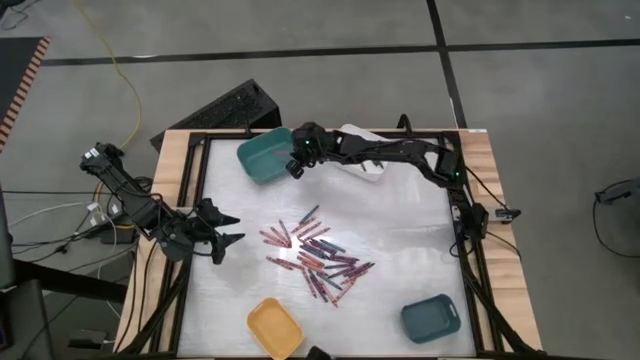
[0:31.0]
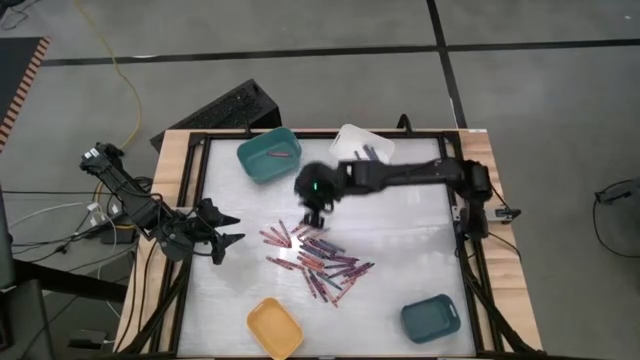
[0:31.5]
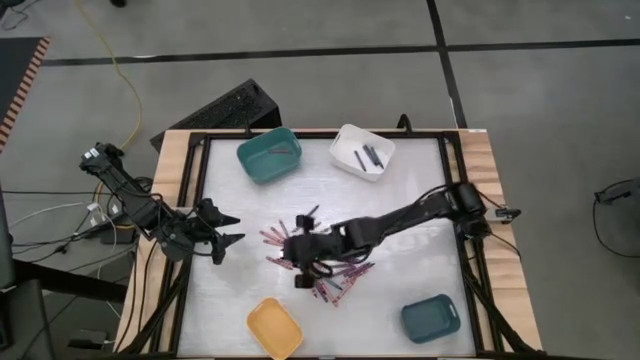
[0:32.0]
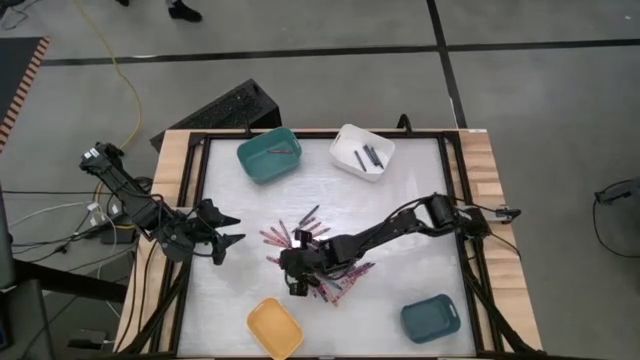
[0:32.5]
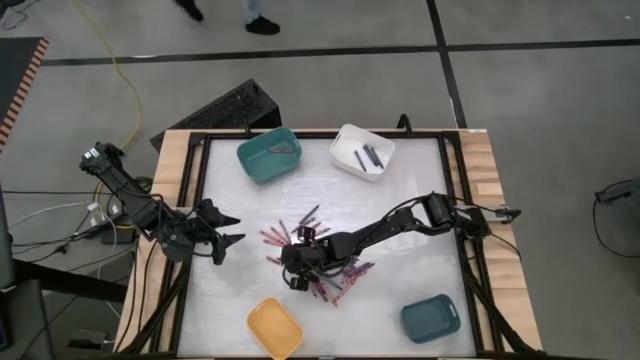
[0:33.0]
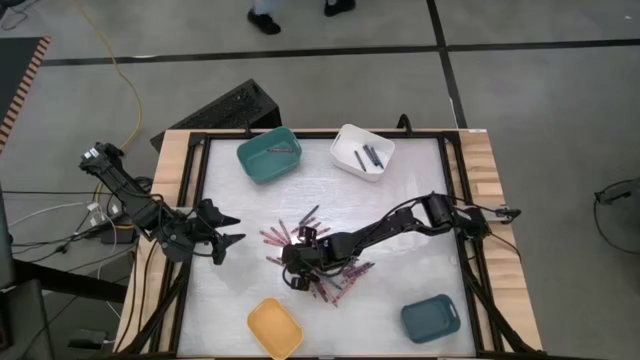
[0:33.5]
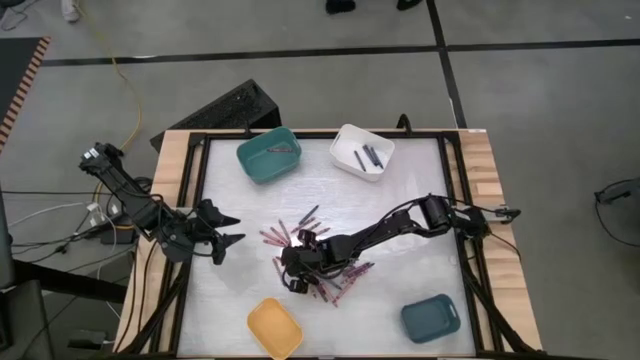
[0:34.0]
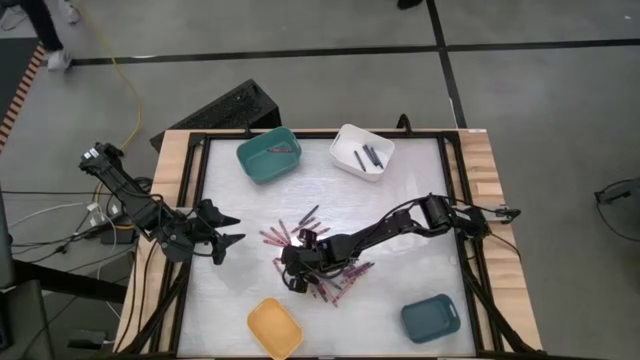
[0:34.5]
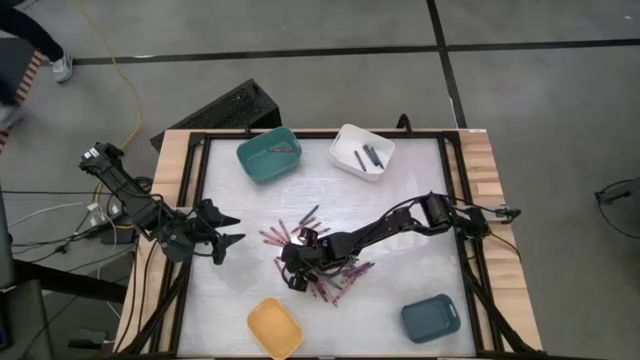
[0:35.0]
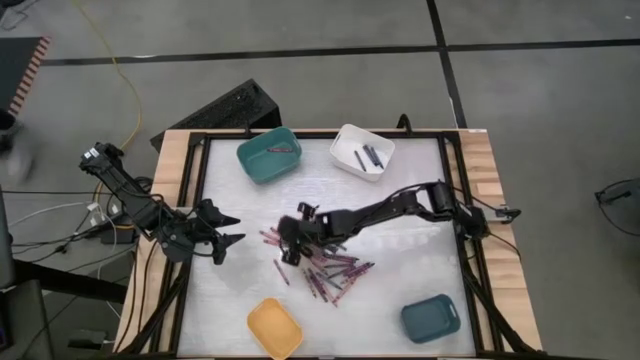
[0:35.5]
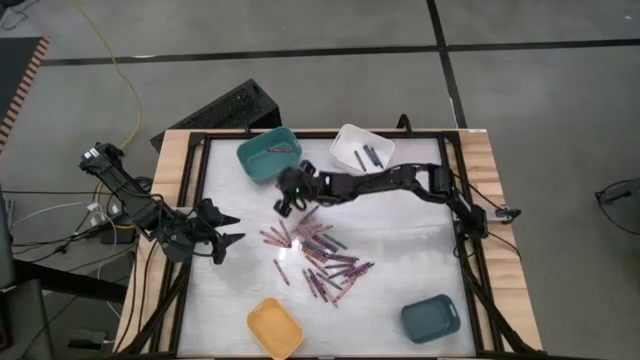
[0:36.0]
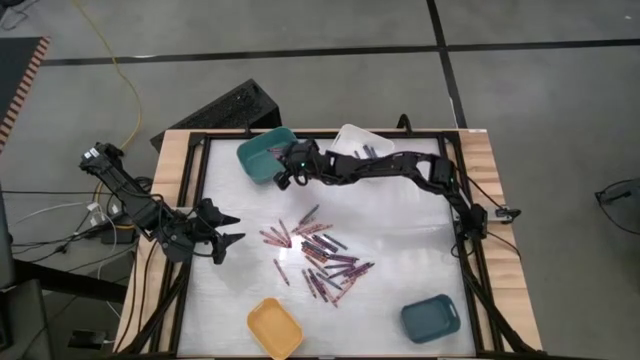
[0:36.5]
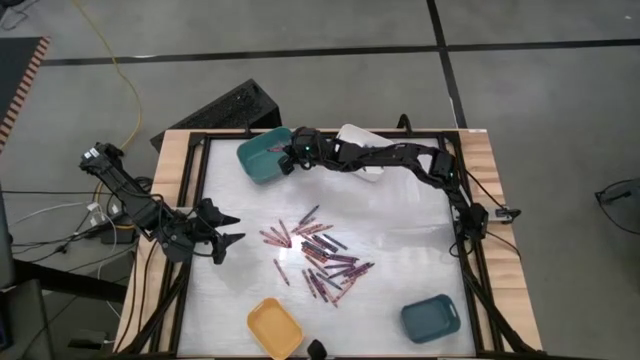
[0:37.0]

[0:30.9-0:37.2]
Task: Sort crayons
Put the red crayon into the top green bin

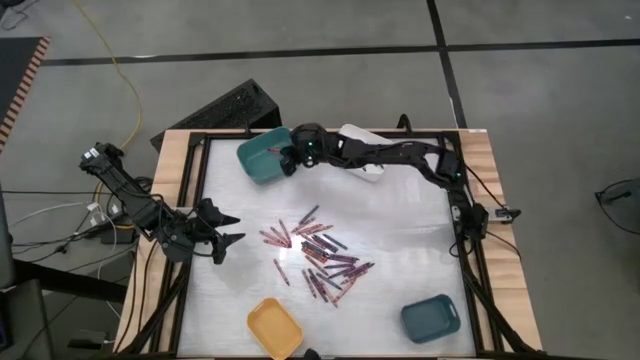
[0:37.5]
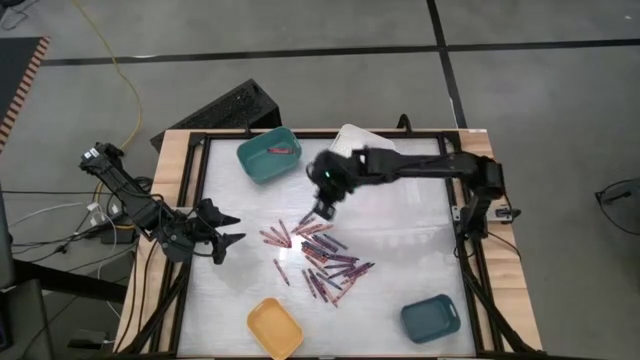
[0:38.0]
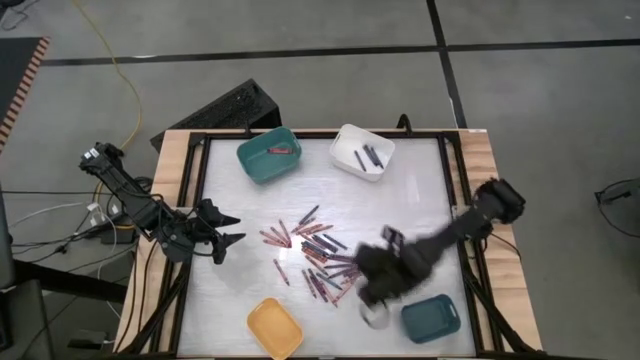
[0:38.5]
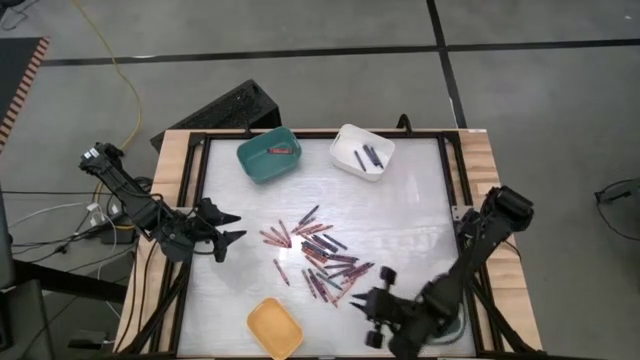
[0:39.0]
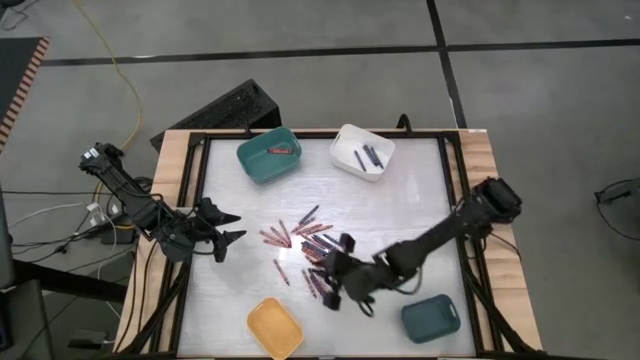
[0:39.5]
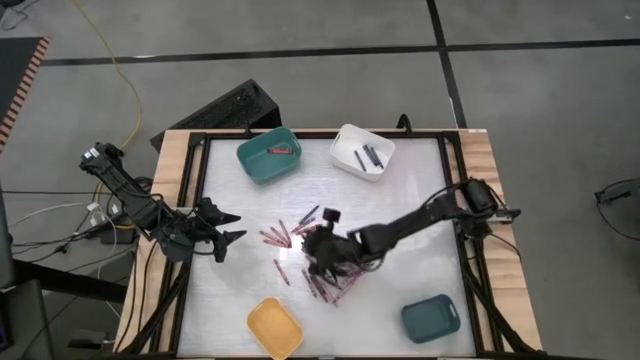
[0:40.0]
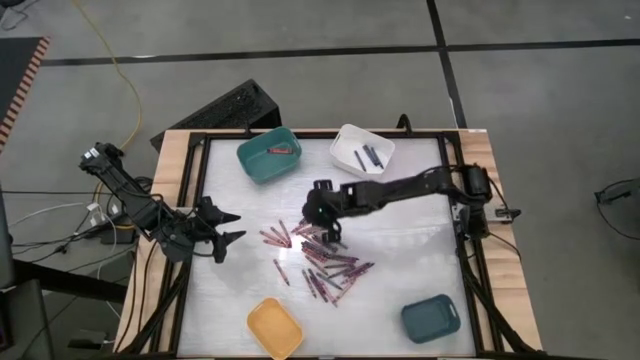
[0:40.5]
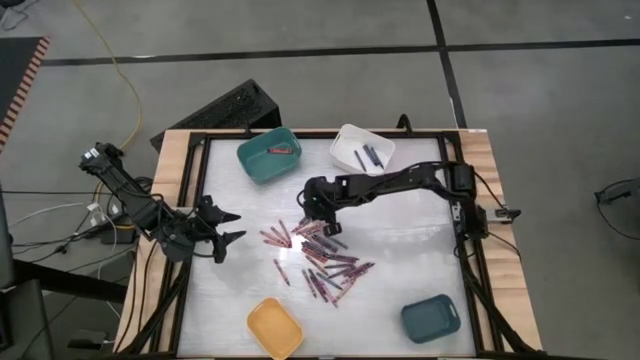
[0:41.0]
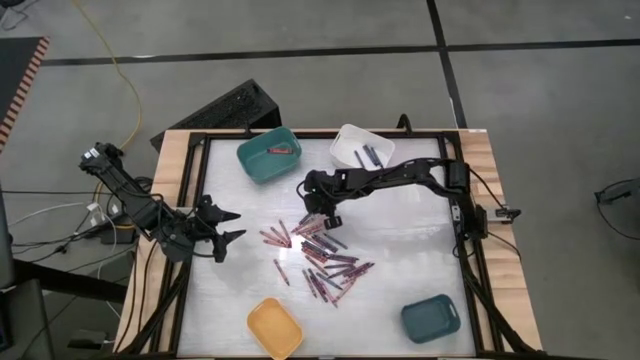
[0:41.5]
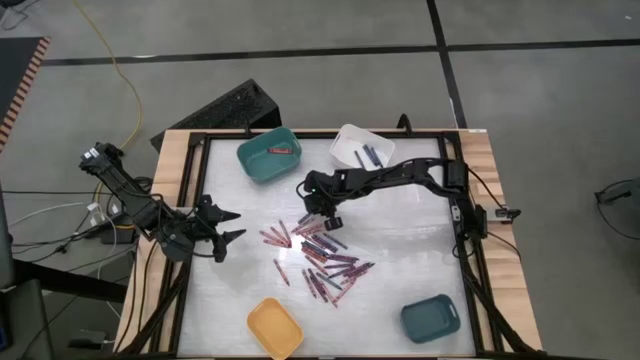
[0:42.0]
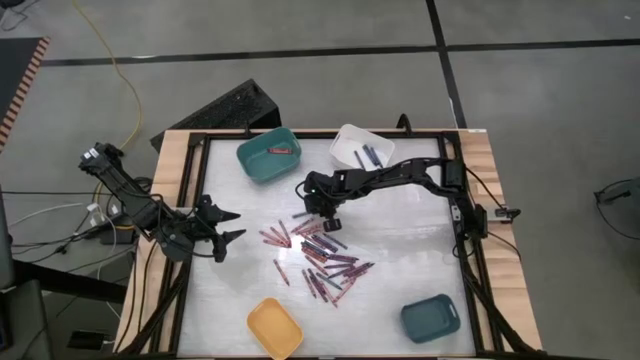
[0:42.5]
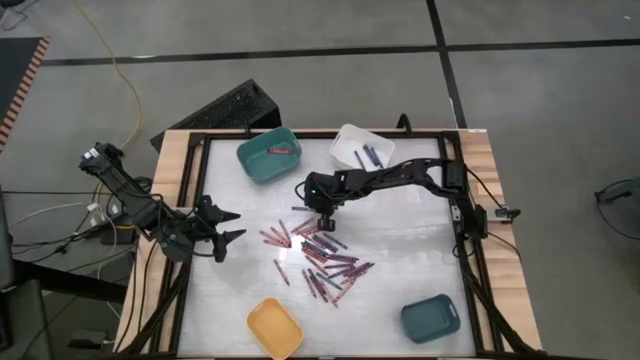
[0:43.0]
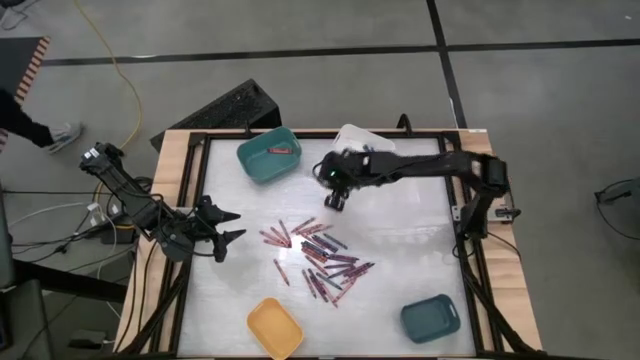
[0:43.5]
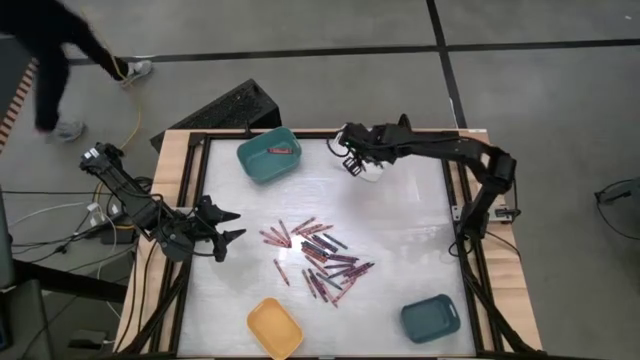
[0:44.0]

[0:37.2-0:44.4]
Put the blue crayon into the white bin

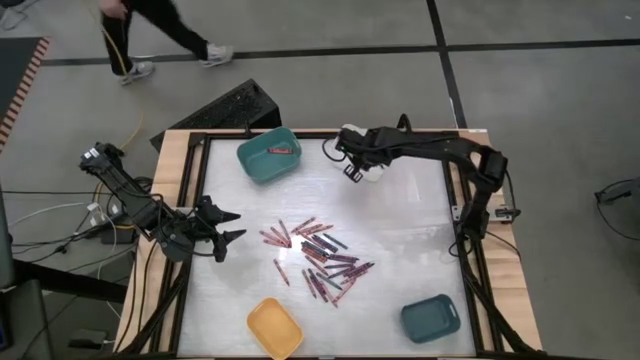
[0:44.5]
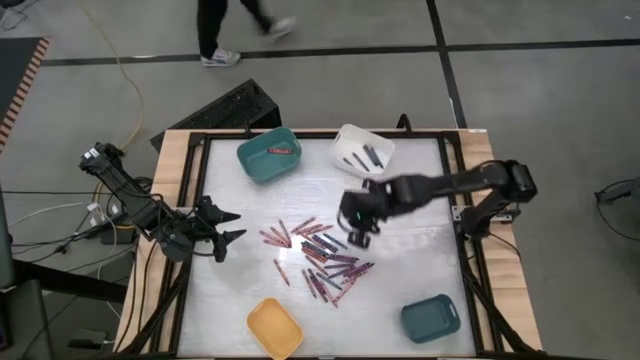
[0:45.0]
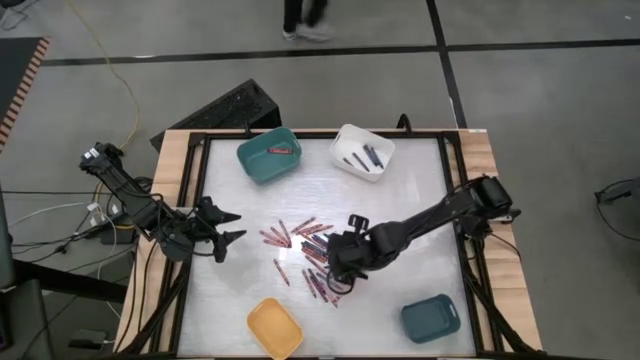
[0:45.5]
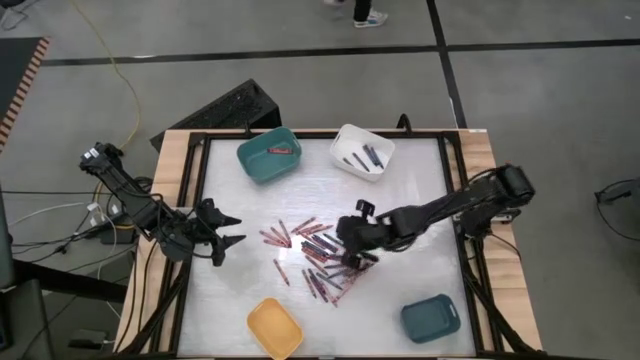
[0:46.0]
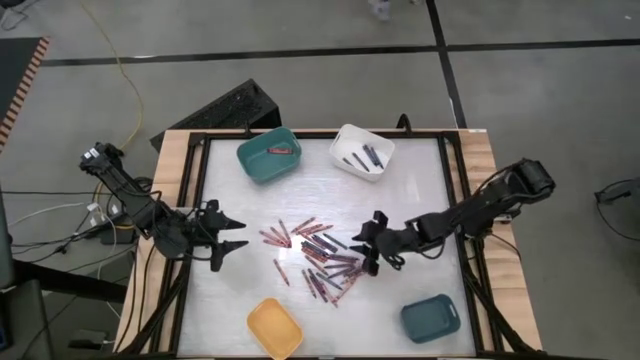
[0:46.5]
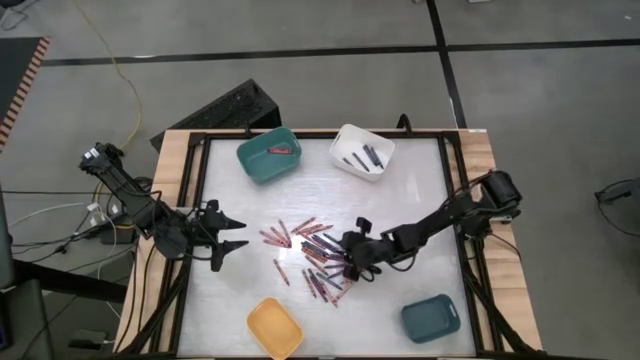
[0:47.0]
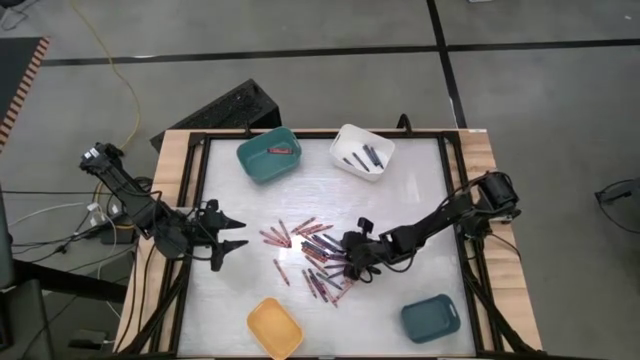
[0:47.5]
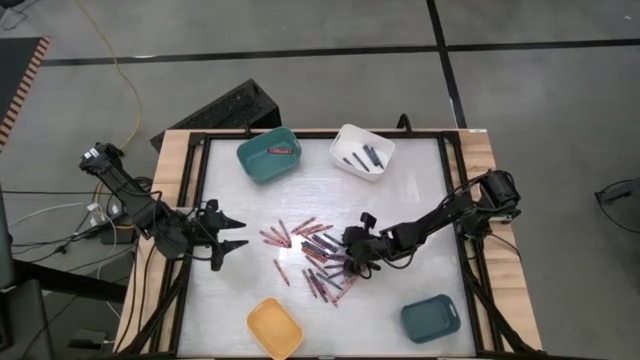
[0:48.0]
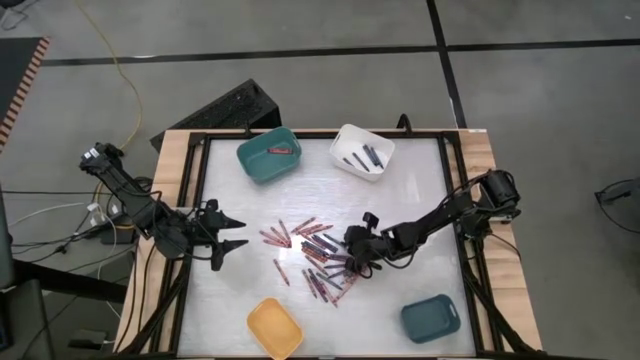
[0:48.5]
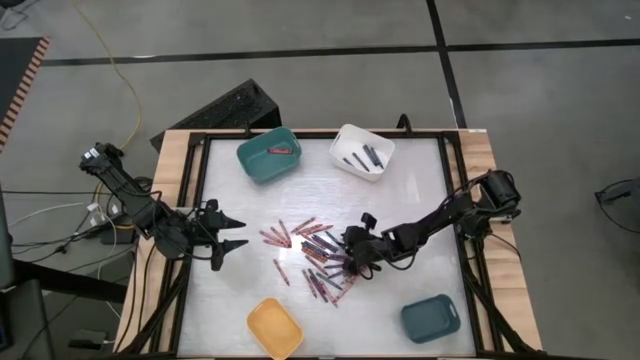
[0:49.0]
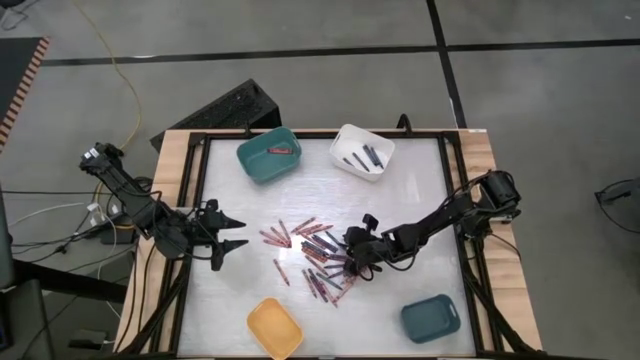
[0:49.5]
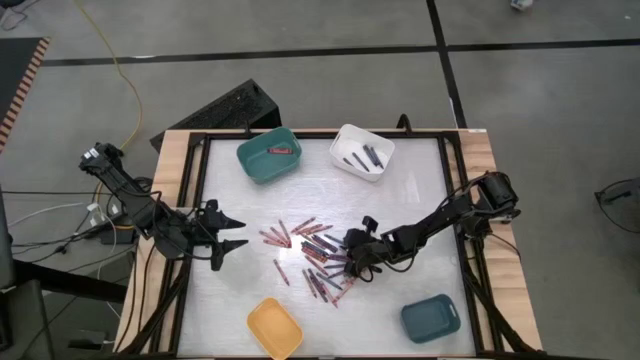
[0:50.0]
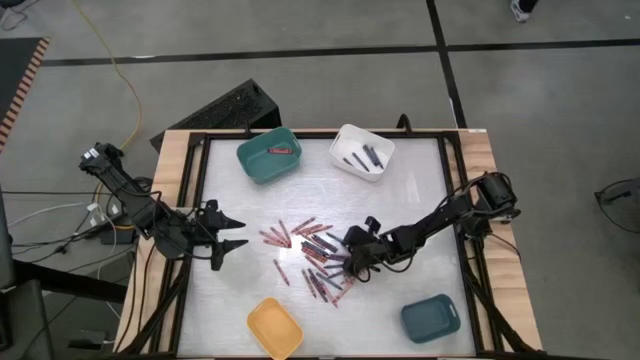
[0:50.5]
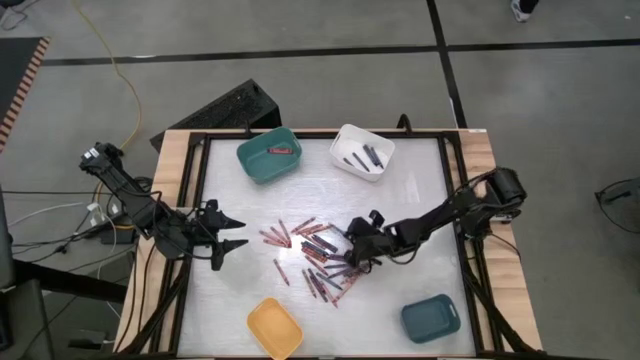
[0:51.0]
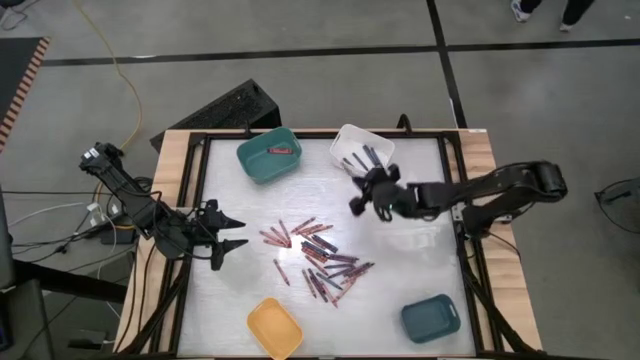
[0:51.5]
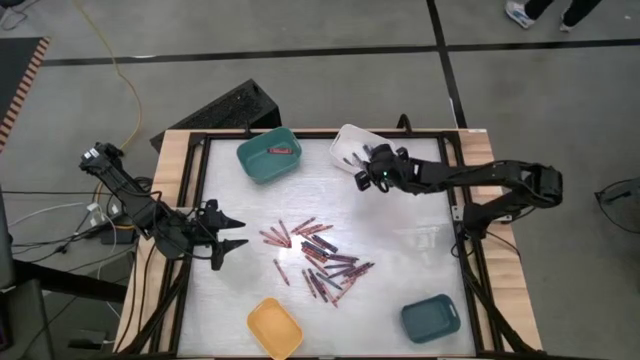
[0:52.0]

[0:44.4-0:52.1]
Put the blue crayon into the white bin

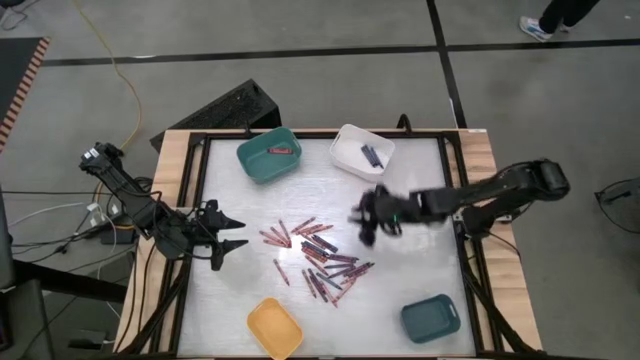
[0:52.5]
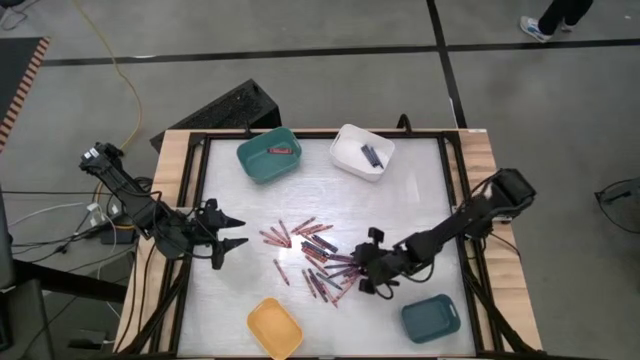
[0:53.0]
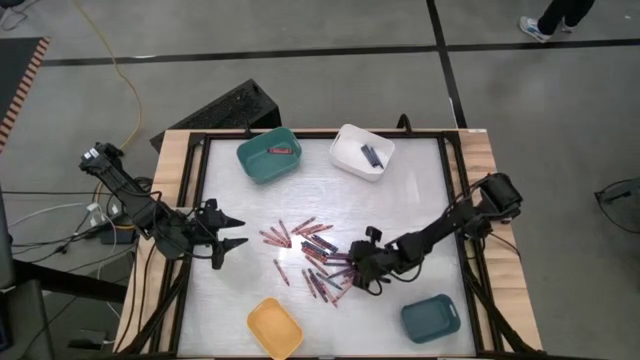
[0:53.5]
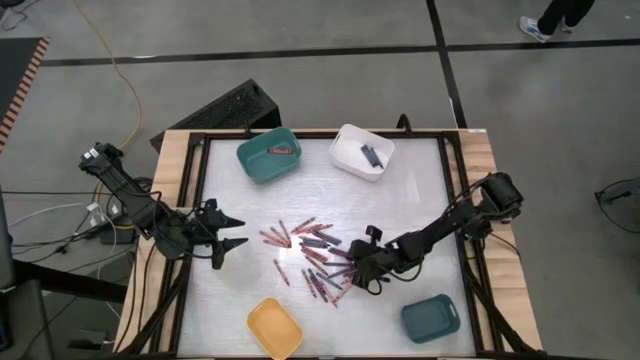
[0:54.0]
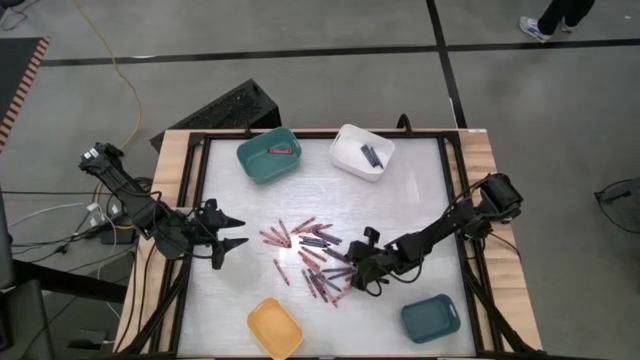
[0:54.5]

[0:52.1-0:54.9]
Put the purple crayon into the blue bin
